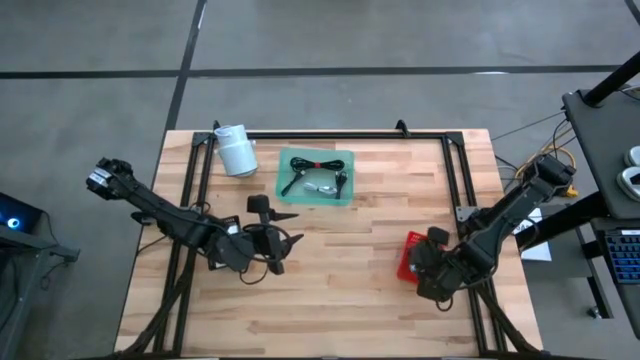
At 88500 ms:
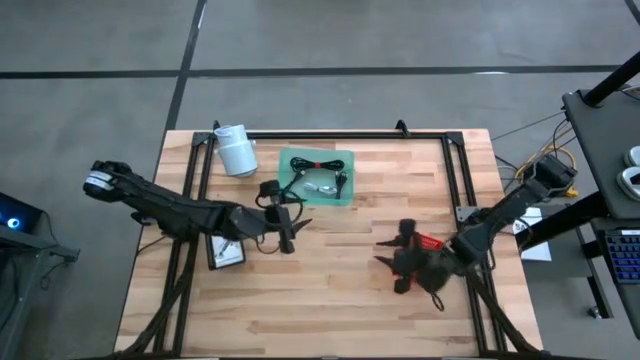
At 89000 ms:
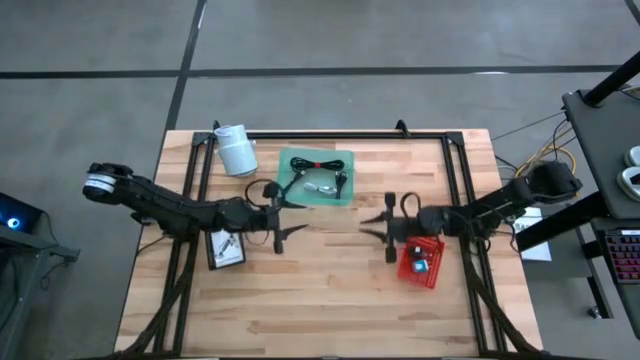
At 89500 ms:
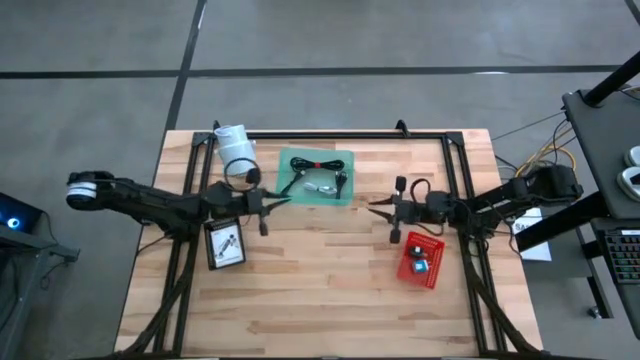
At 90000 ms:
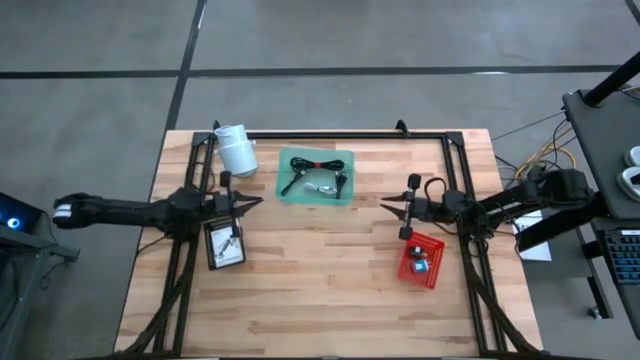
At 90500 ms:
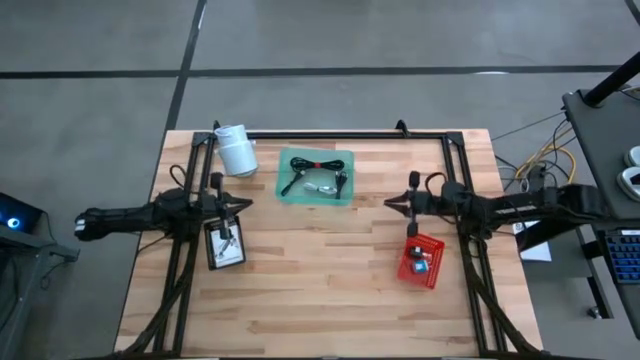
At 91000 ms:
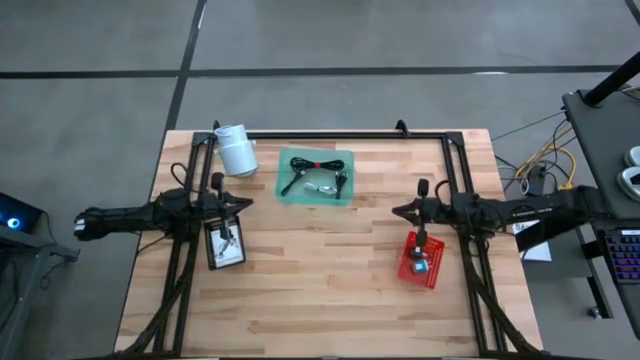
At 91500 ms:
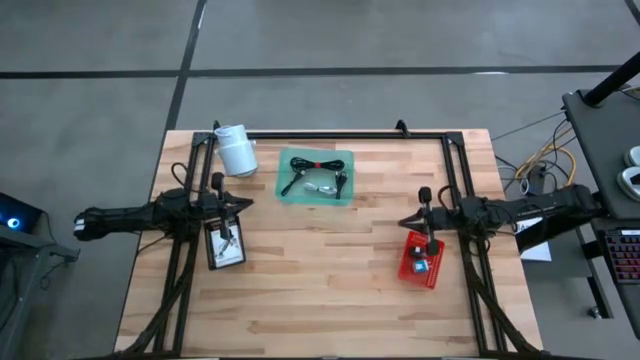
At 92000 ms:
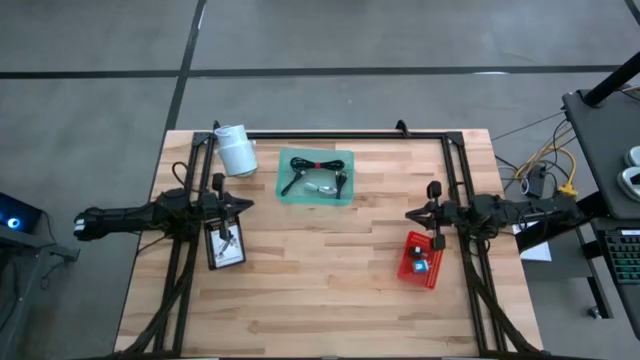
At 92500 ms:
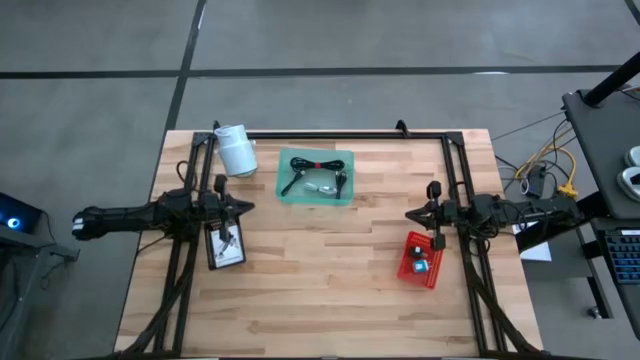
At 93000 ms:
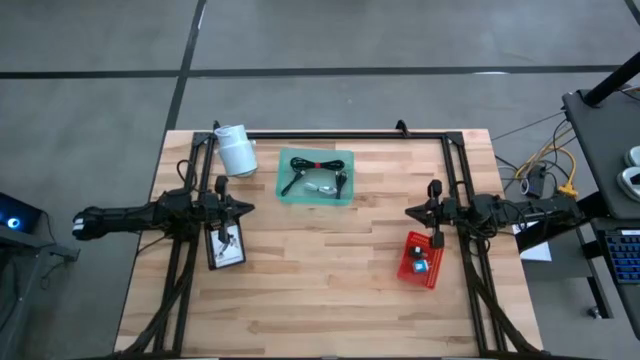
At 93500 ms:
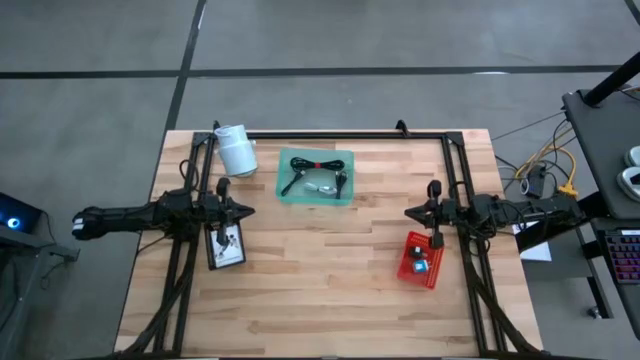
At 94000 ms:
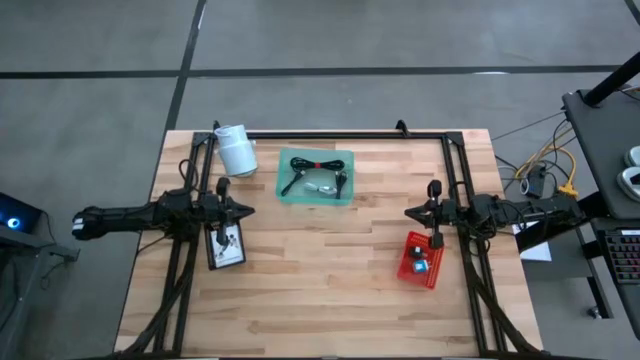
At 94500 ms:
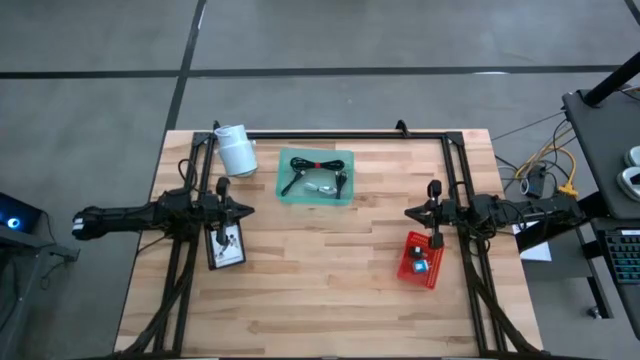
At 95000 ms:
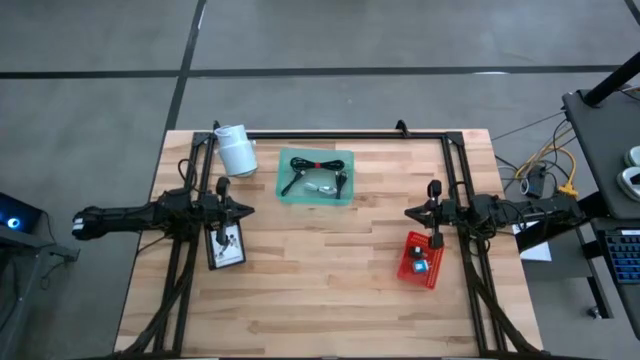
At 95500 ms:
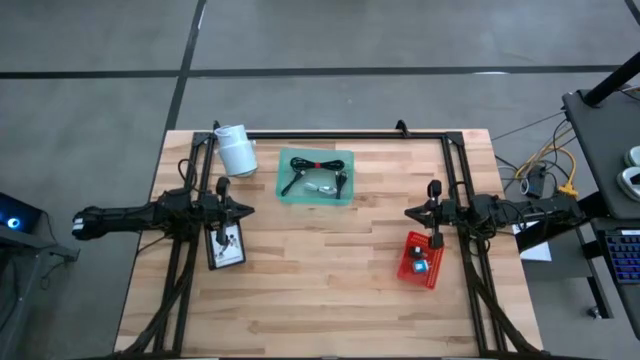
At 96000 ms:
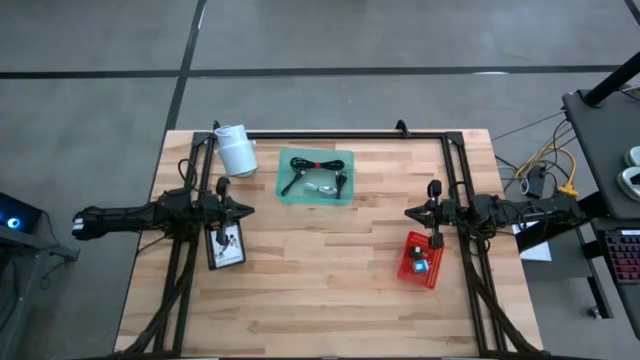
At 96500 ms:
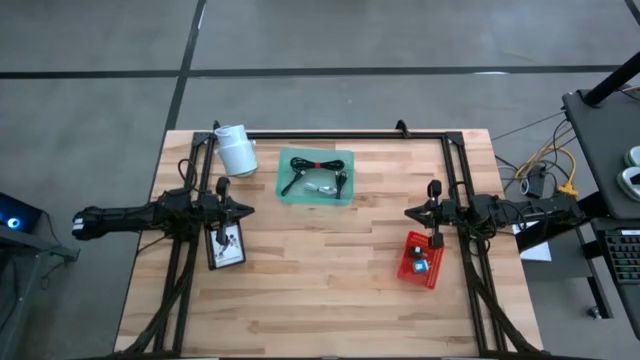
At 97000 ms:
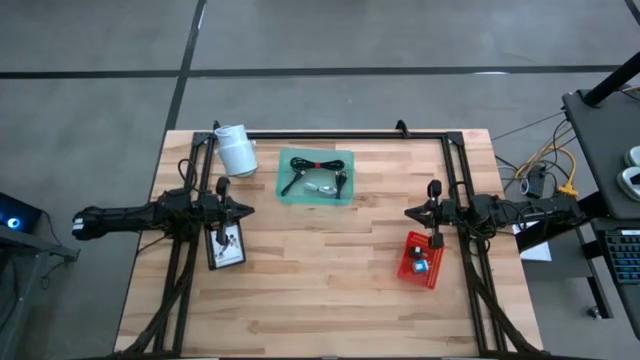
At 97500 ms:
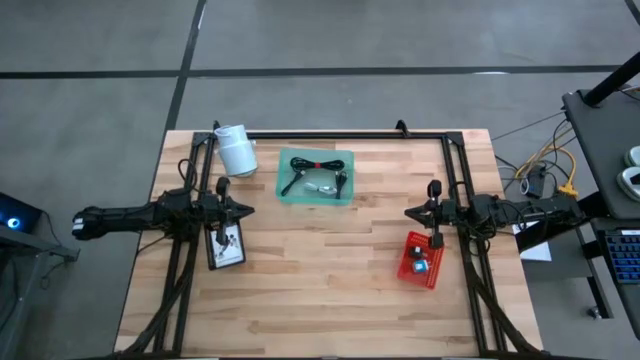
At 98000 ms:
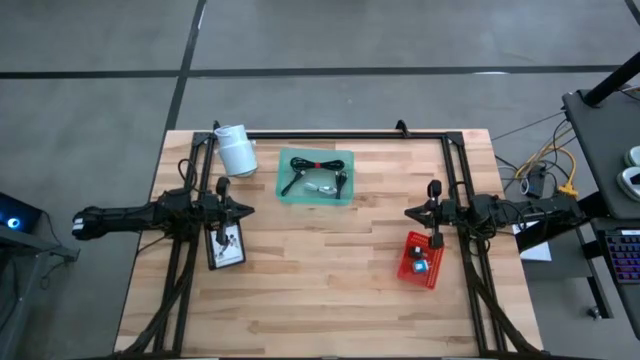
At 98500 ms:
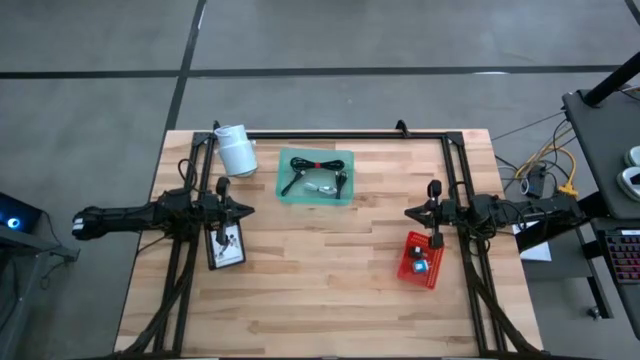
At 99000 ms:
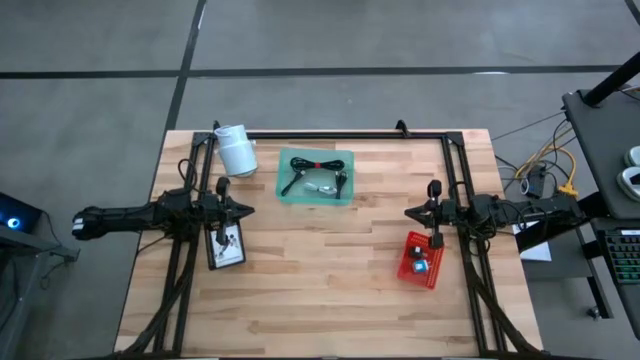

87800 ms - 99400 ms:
Task: Pick and place items into bin
Return to Home Position

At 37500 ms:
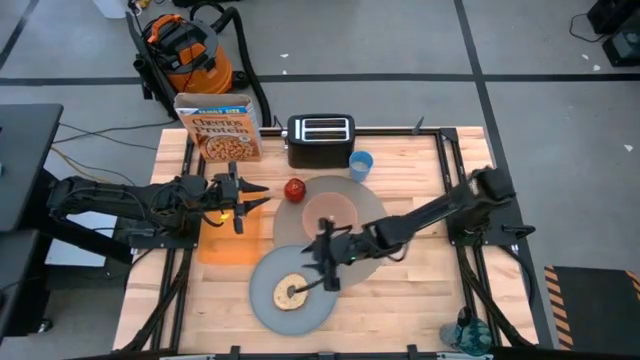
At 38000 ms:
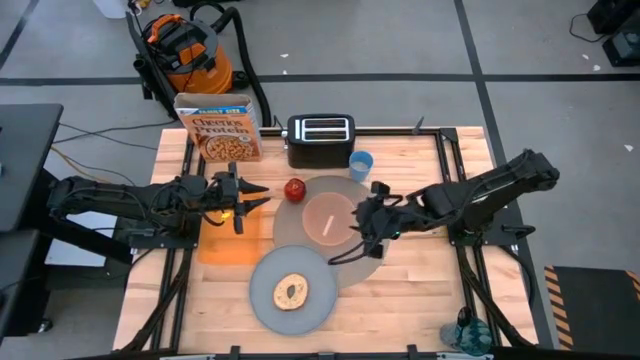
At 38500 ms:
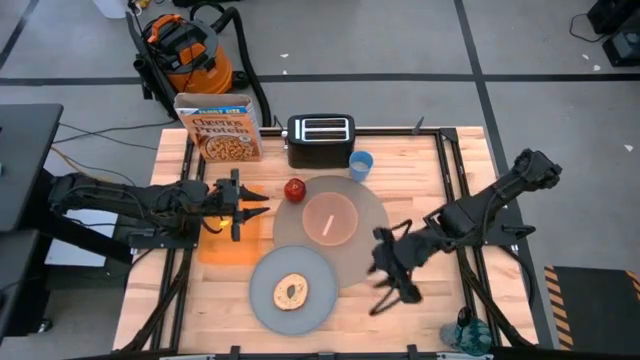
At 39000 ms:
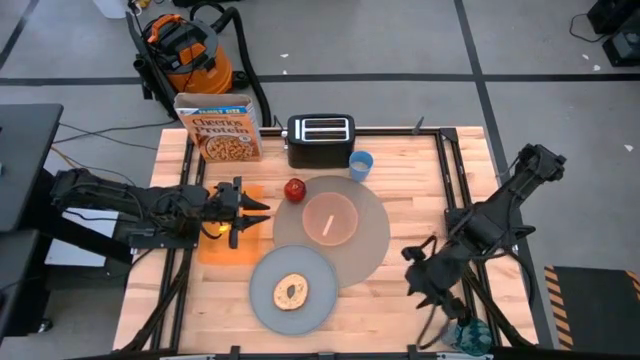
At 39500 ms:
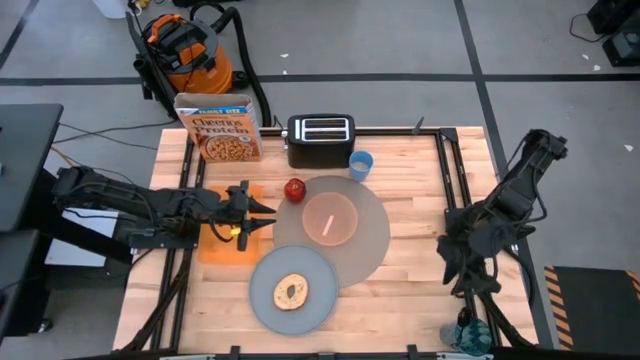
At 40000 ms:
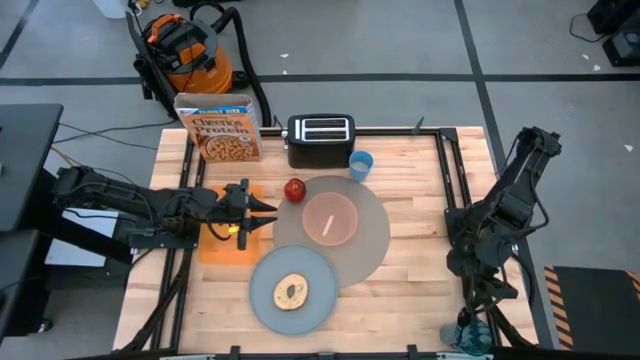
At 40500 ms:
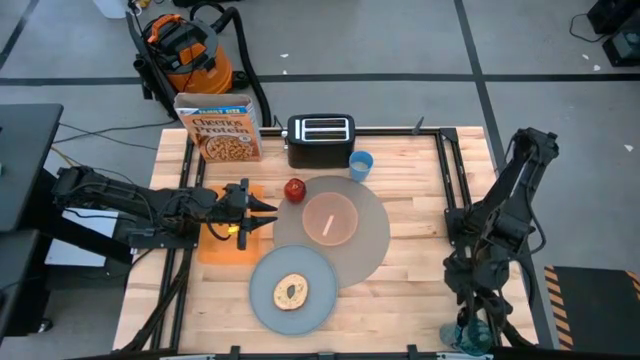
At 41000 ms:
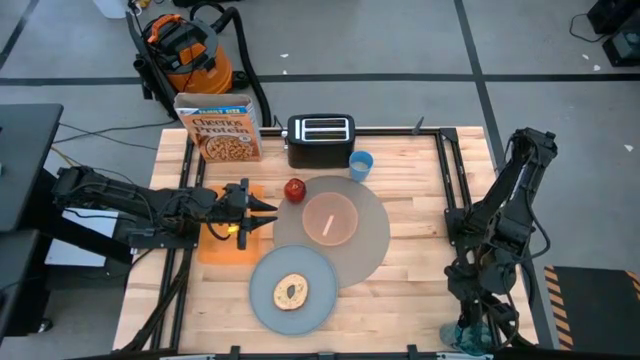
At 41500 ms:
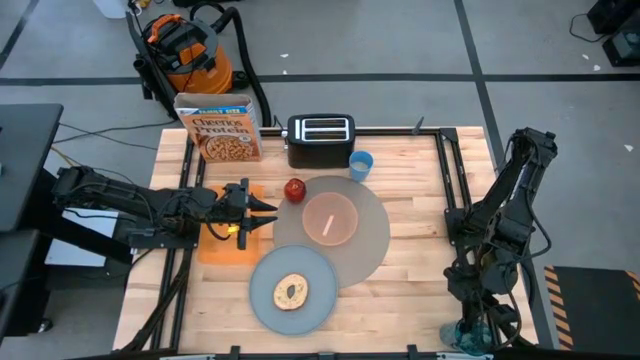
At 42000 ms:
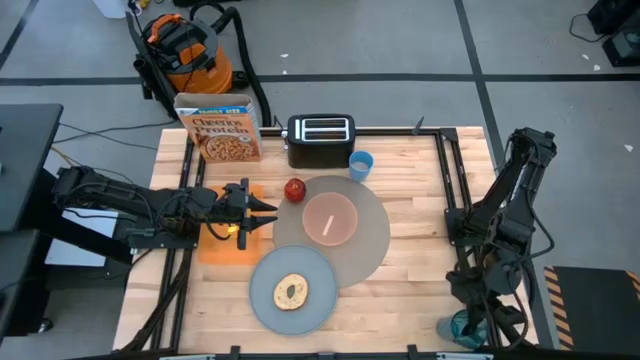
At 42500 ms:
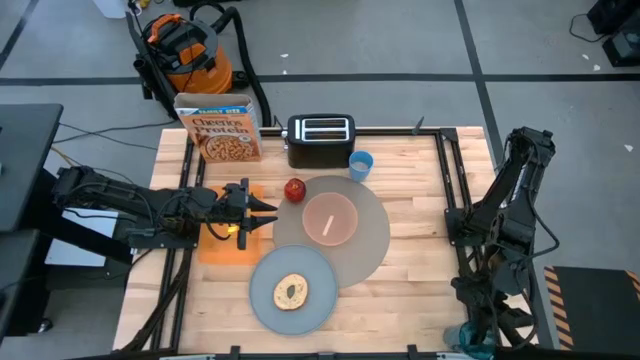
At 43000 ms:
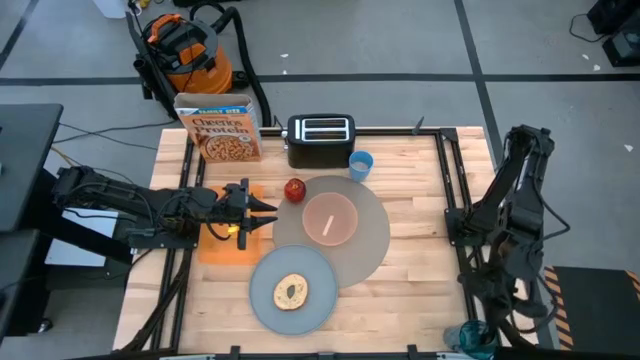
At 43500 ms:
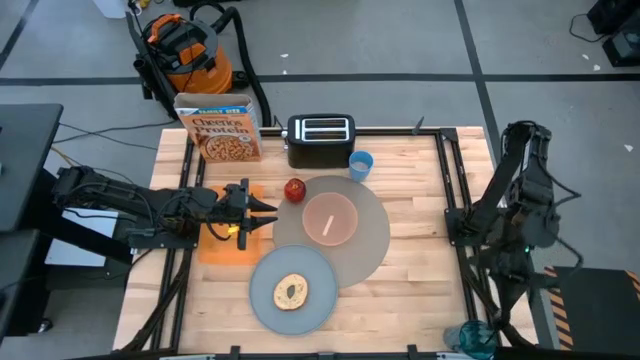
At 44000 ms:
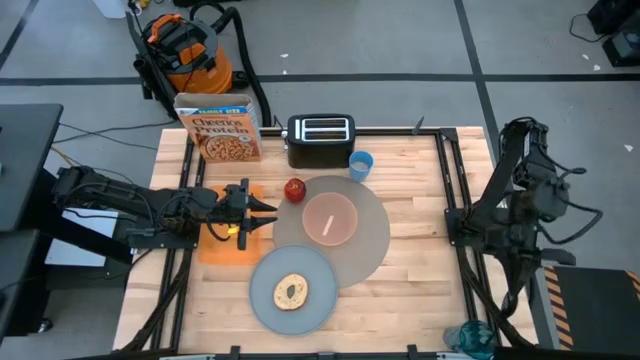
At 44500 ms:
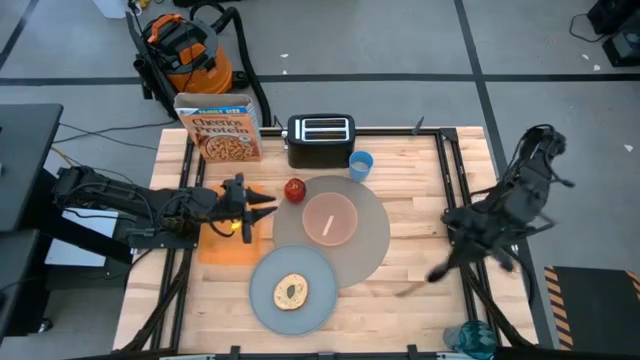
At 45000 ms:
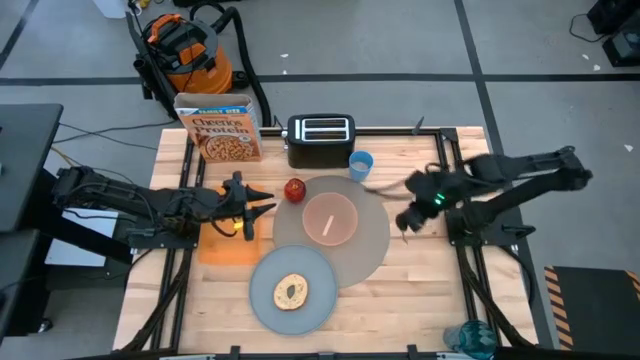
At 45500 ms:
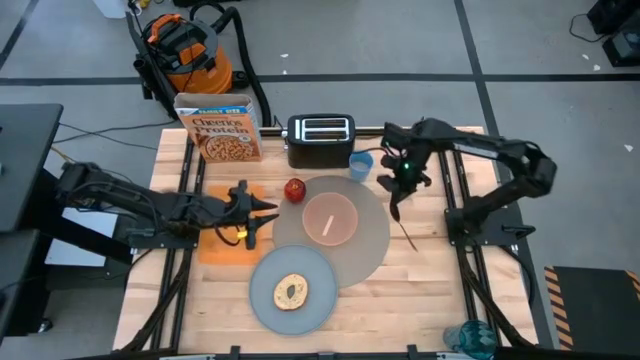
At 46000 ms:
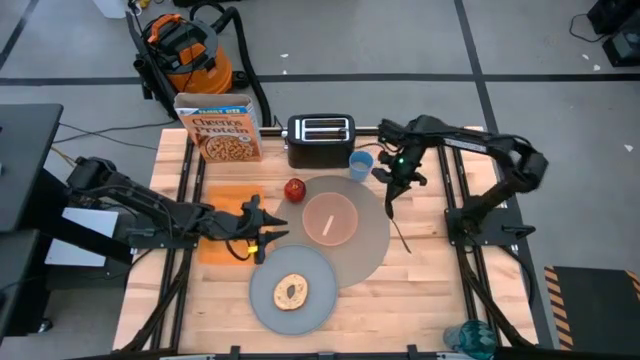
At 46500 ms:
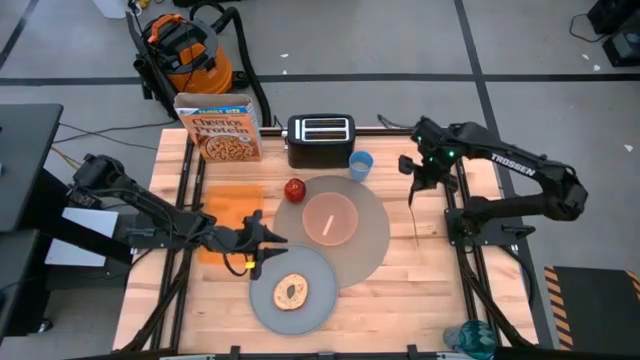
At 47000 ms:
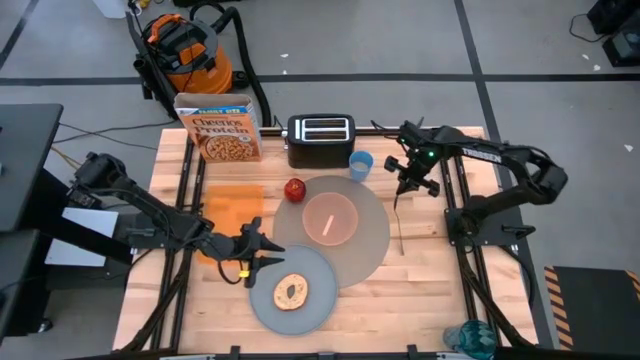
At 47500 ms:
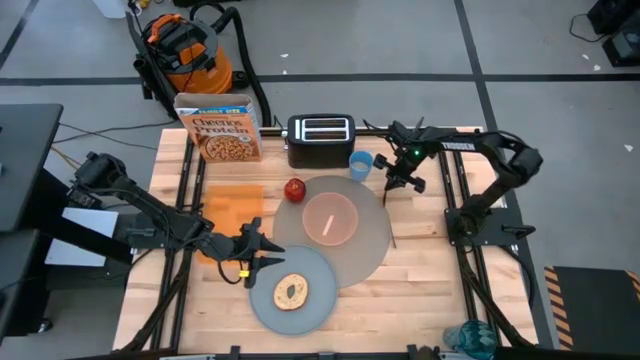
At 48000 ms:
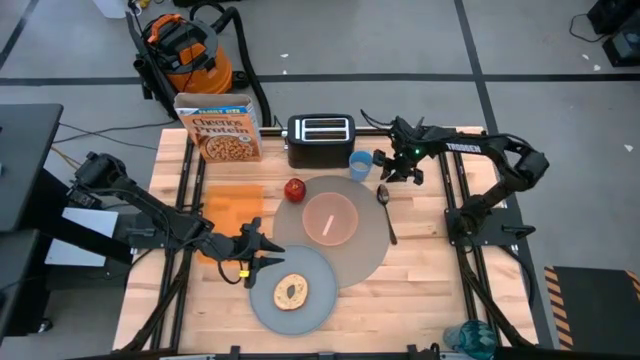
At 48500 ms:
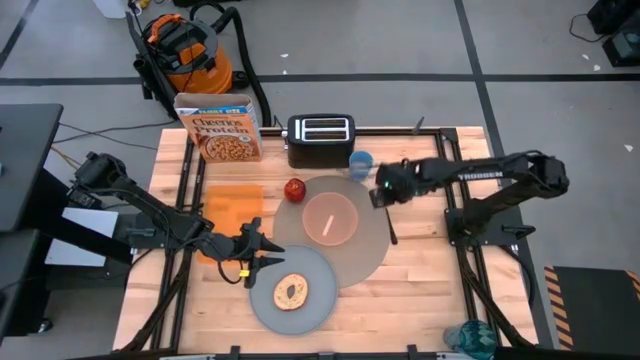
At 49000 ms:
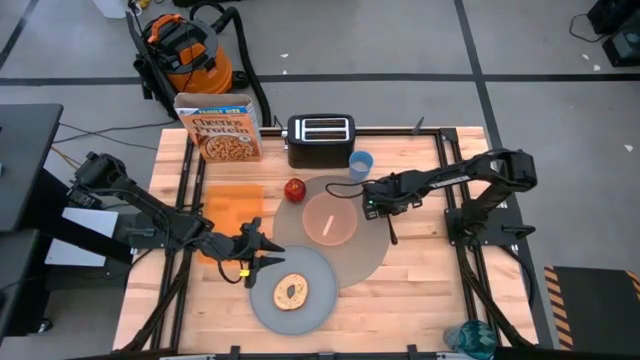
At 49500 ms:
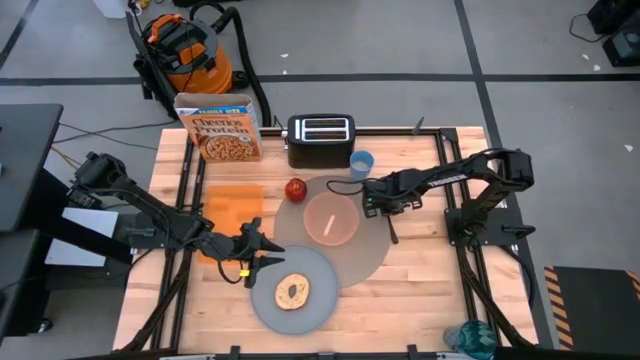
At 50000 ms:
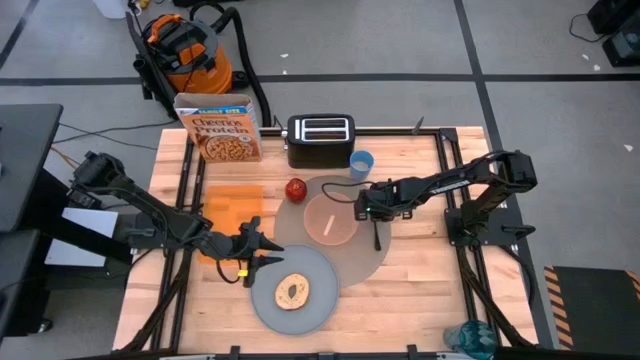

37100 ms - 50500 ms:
Task: Arrange a breakfast setting
Put the black spoon on the gray table mat to the right side of the orange bowl
